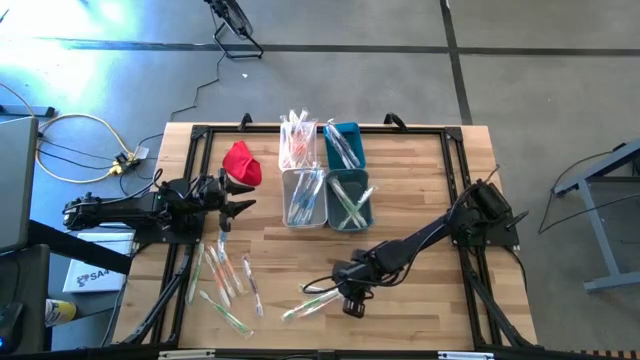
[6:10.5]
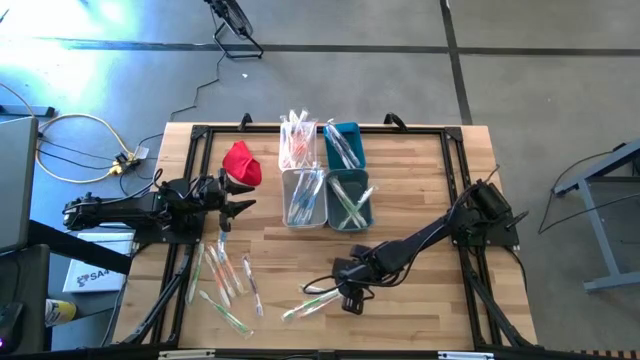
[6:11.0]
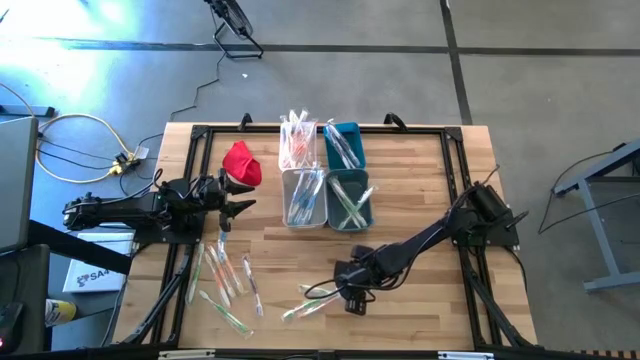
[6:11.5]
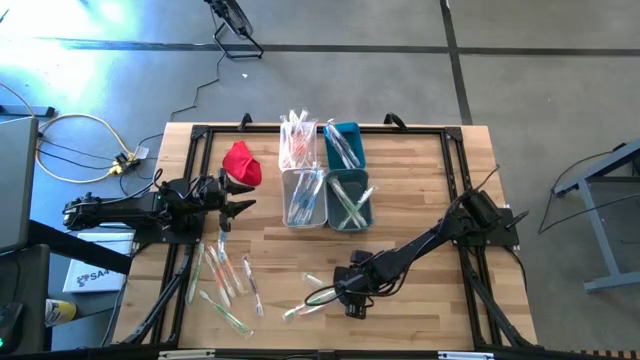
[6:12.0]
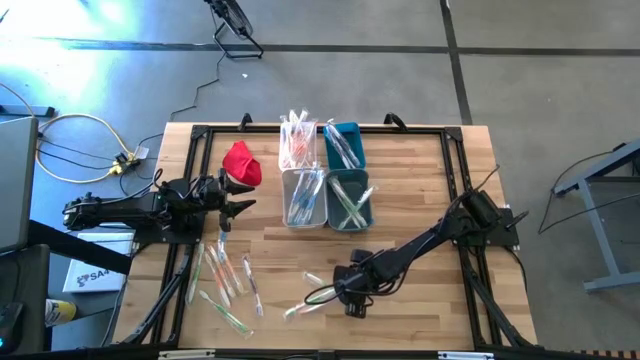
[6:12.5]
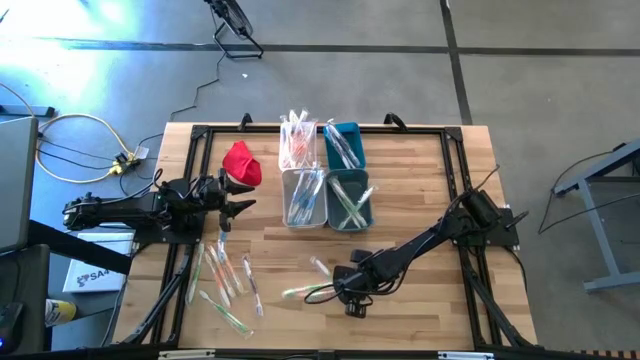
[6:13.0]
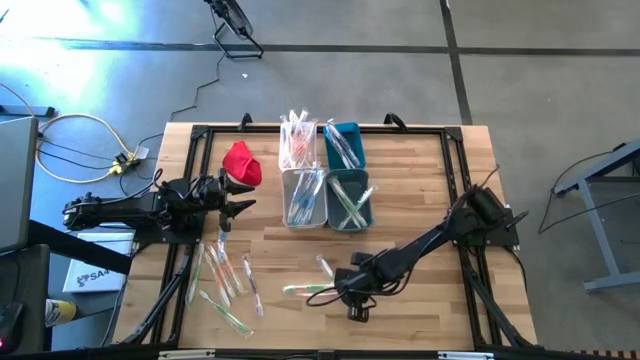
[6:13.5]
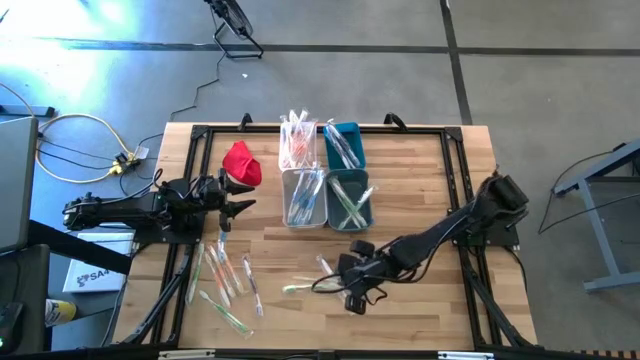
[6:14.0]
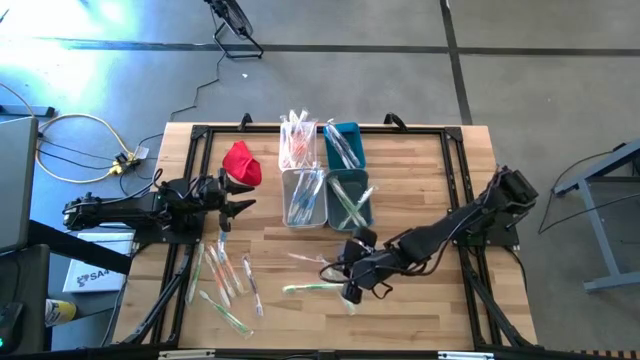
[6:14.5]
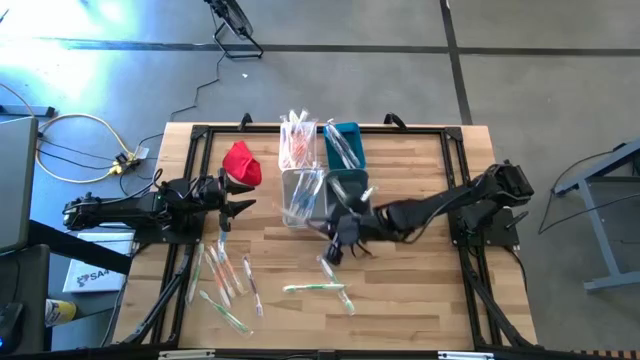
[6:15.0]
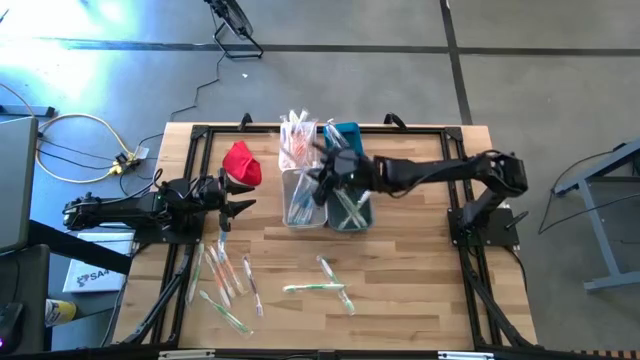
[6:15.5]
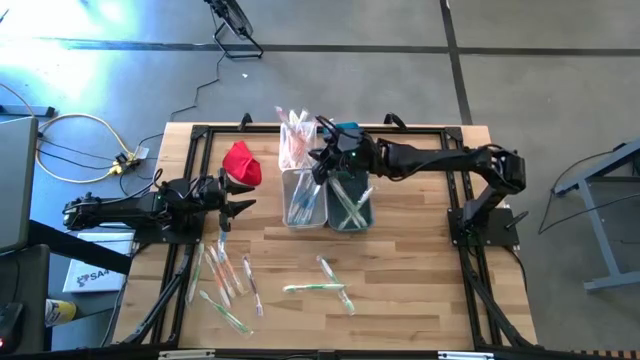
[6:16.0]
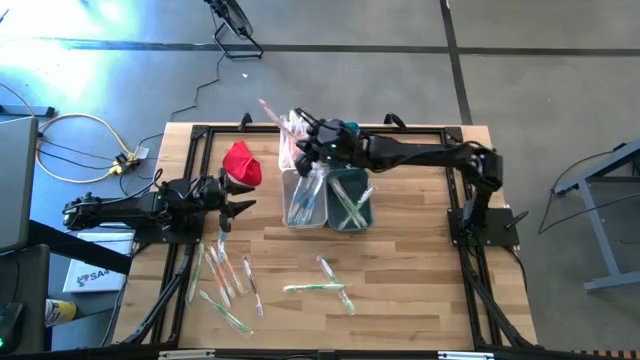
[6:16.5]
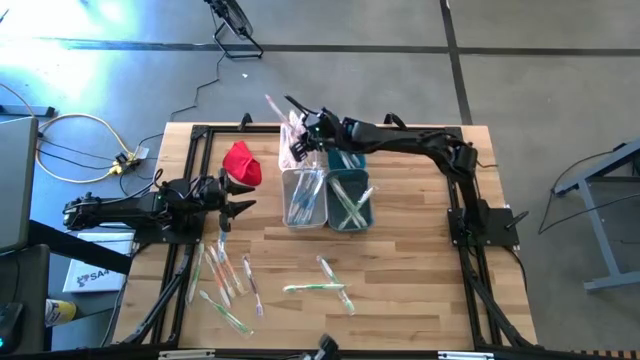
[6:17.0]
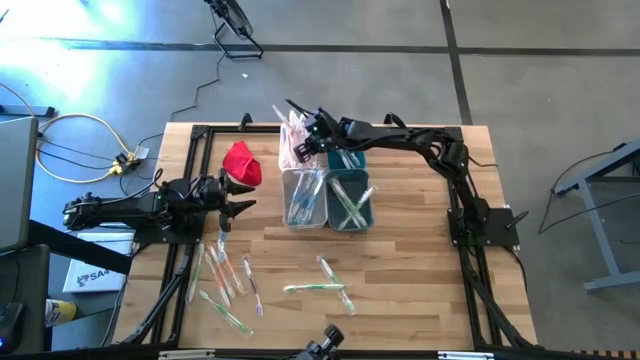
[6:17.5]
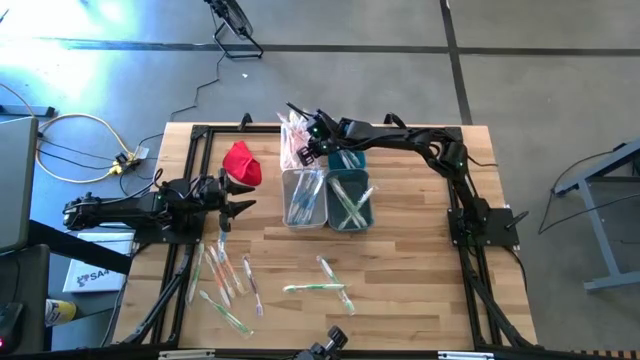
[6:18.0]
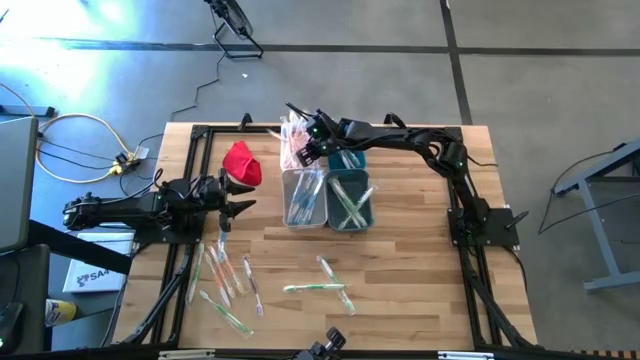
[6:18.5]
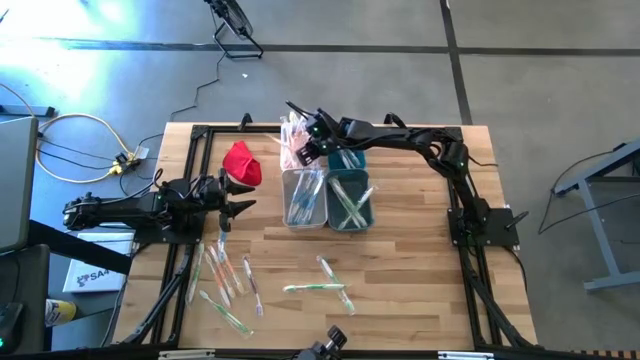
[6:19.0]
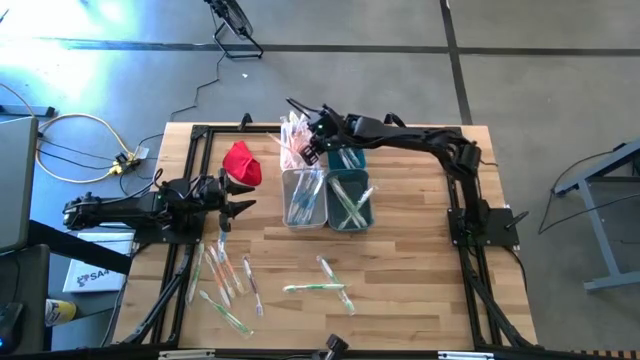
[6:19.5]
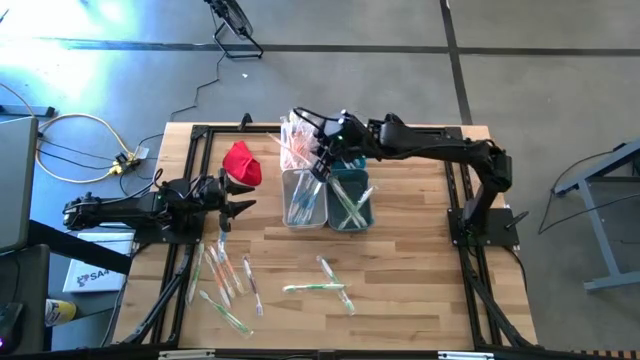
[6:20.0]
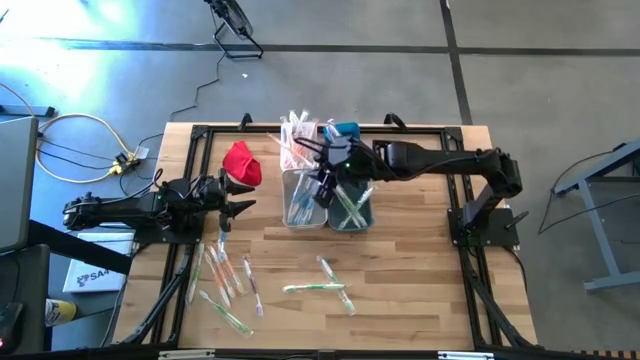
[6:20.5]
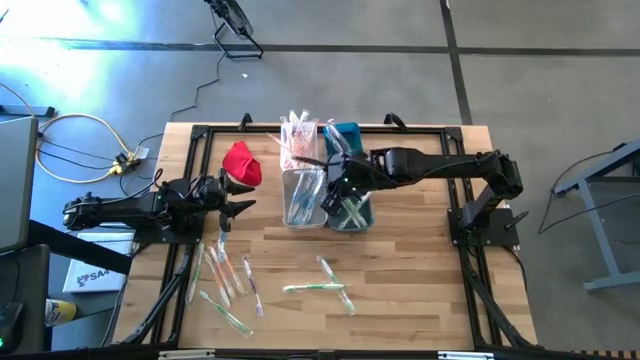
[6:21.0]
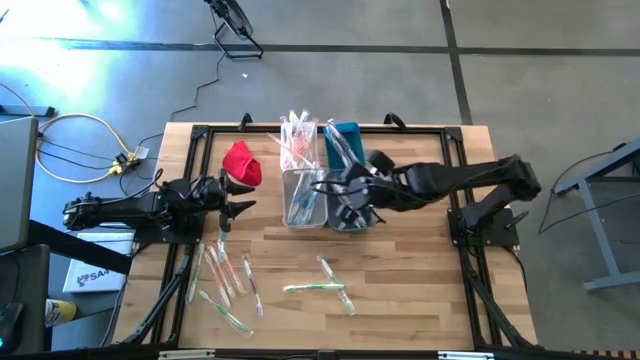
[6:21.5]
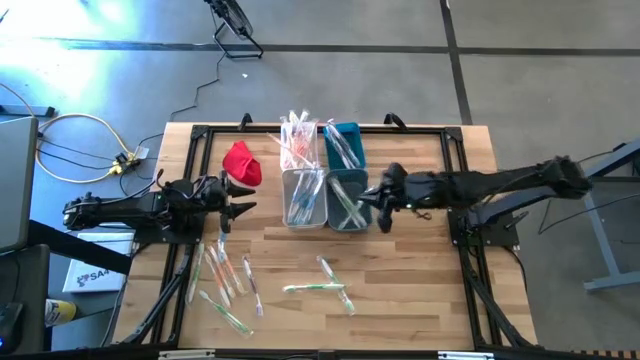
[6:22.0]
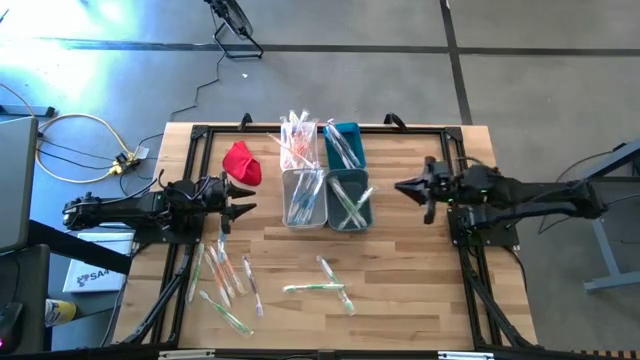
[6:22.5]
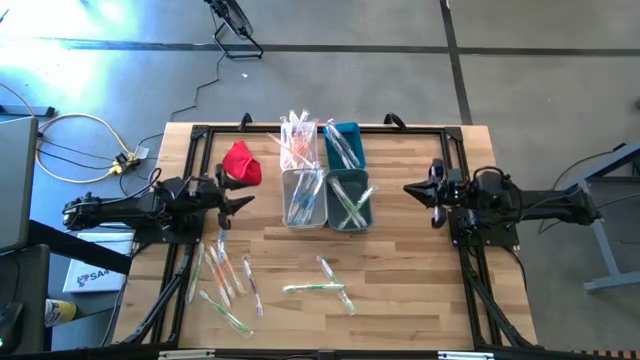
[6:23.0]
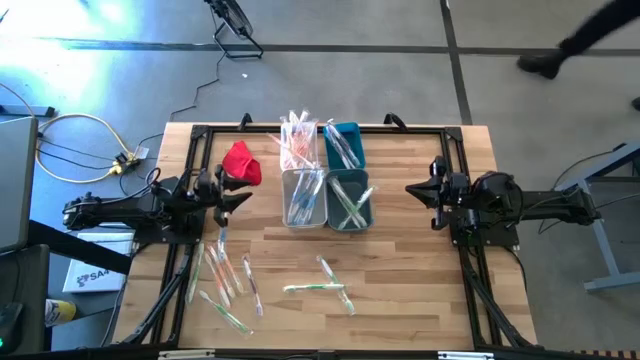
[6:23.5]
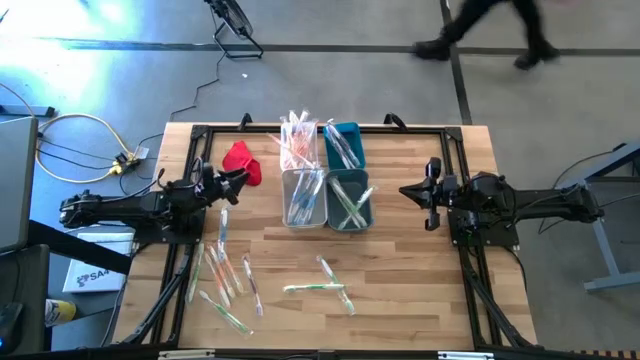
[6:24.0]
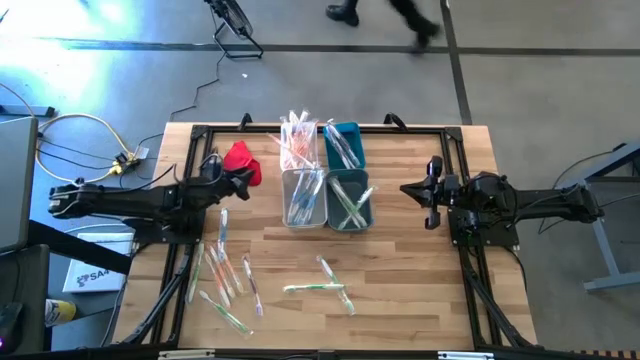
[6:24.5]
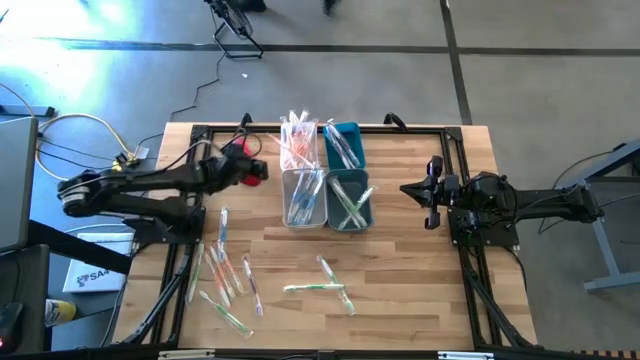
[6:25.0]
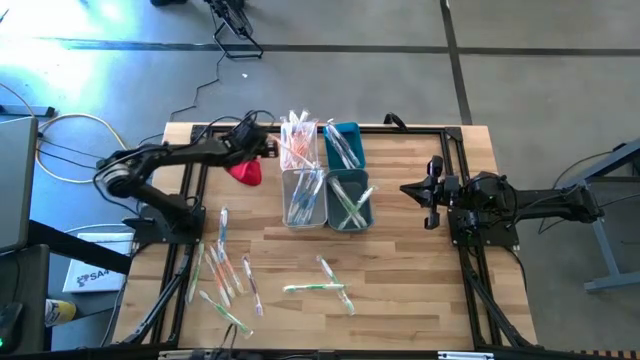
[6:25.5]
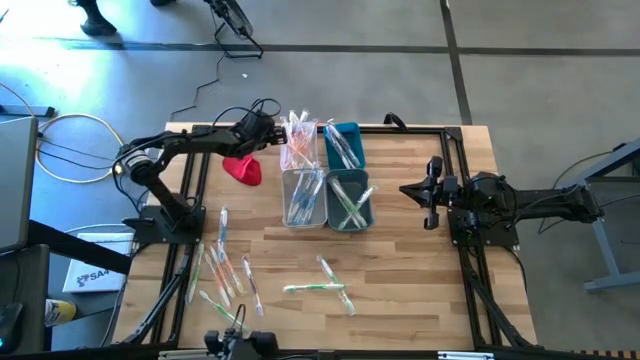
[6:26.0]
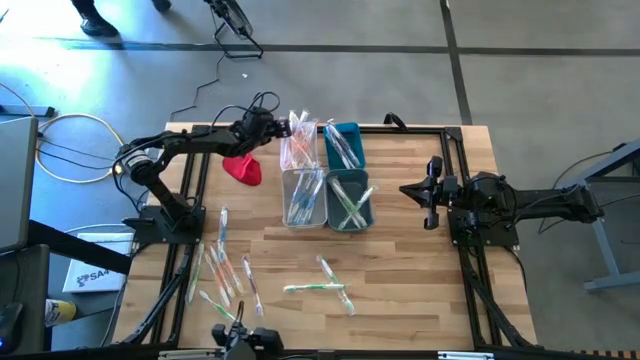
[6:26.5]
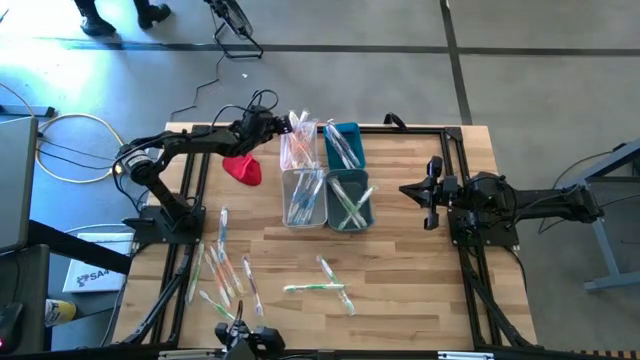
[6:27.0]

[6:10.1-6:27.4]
Task: Pick & Place Toothbrushes
Put the orange toothbrush into the transparent bin
